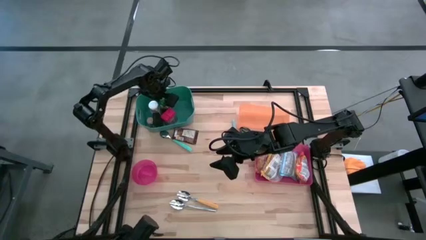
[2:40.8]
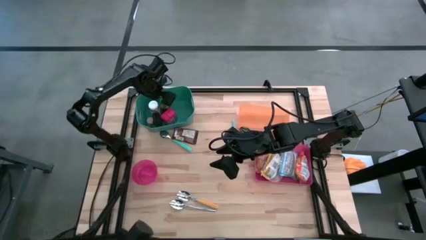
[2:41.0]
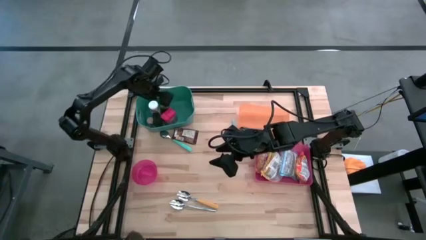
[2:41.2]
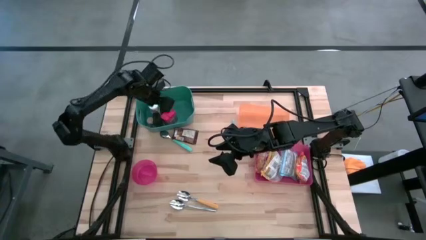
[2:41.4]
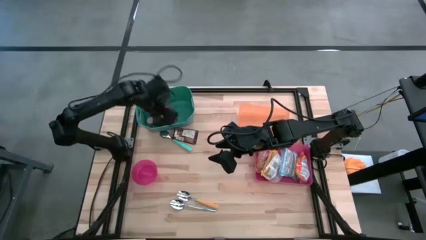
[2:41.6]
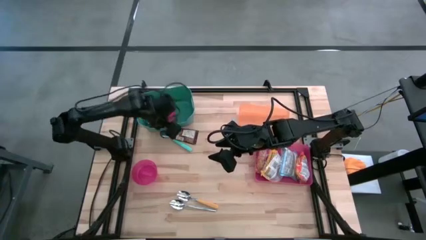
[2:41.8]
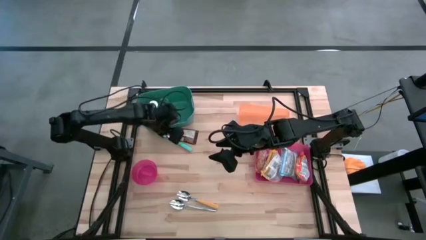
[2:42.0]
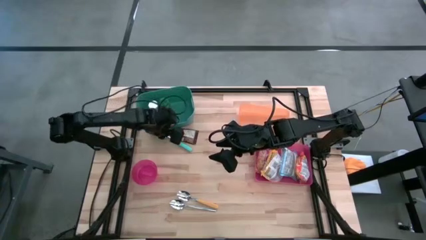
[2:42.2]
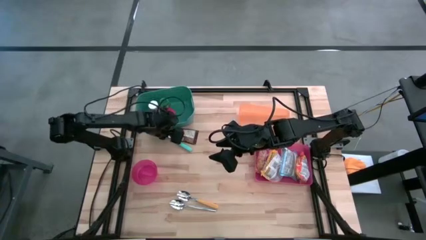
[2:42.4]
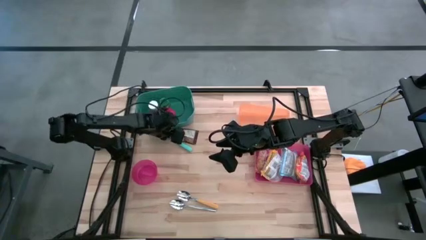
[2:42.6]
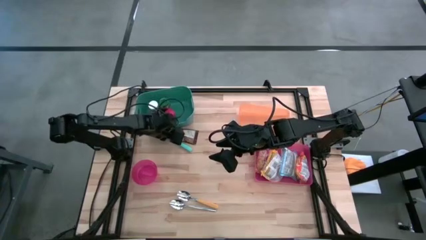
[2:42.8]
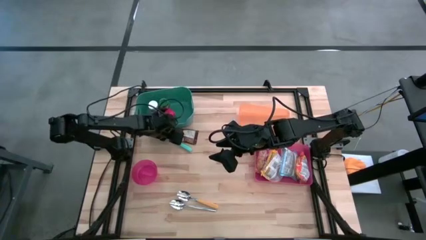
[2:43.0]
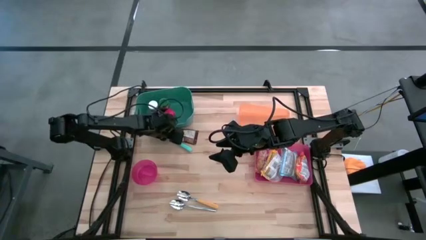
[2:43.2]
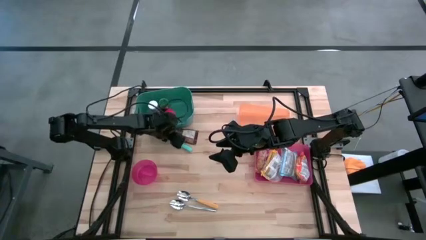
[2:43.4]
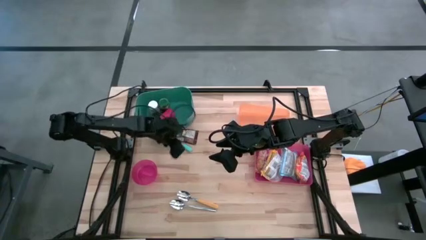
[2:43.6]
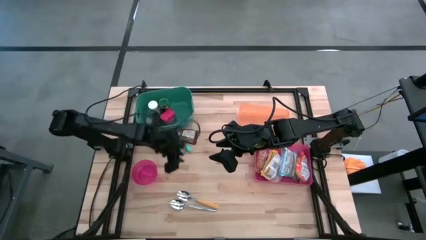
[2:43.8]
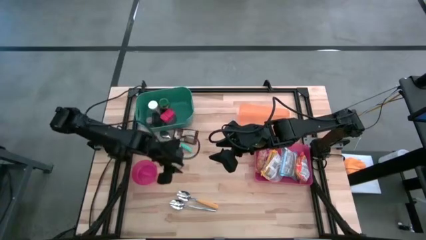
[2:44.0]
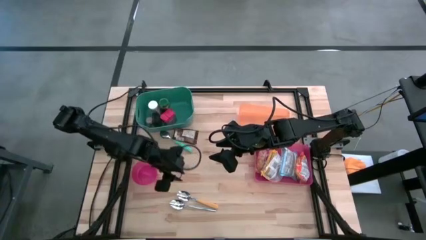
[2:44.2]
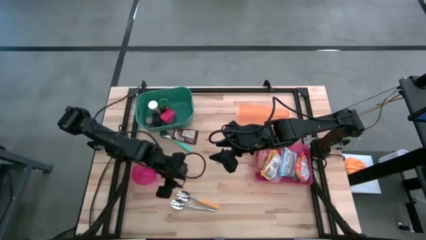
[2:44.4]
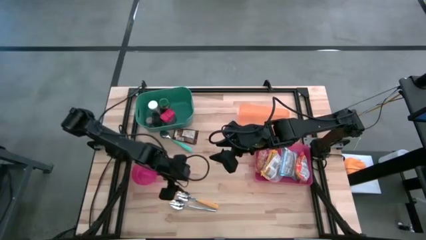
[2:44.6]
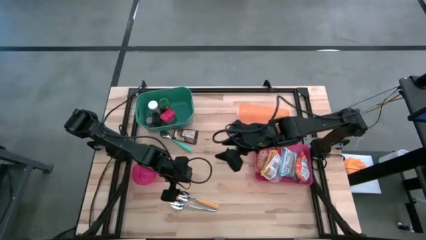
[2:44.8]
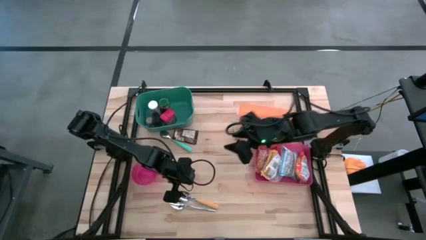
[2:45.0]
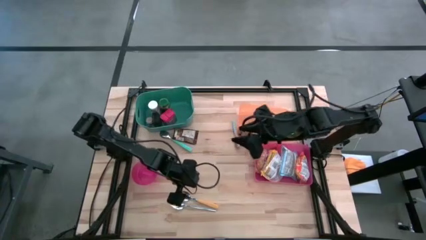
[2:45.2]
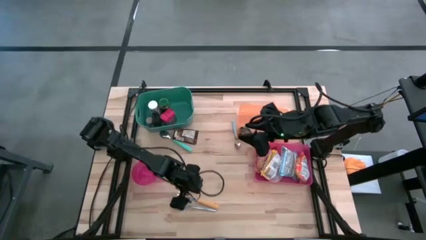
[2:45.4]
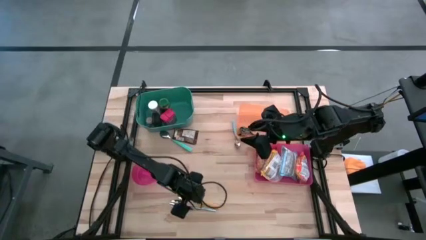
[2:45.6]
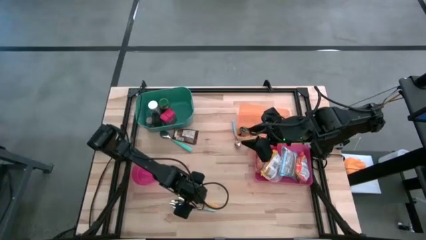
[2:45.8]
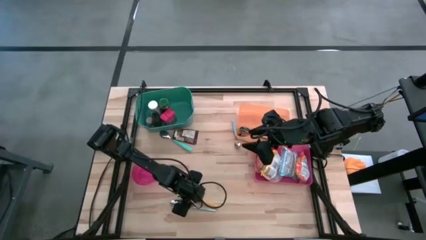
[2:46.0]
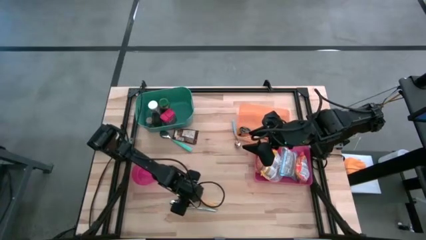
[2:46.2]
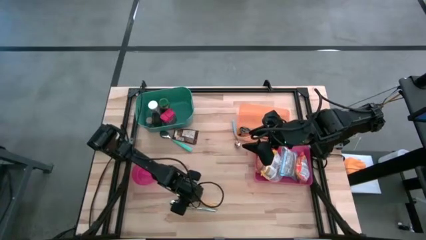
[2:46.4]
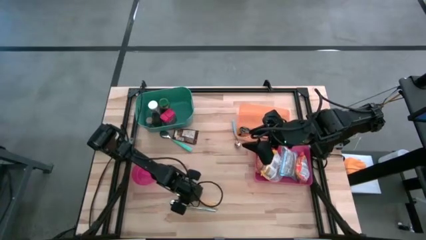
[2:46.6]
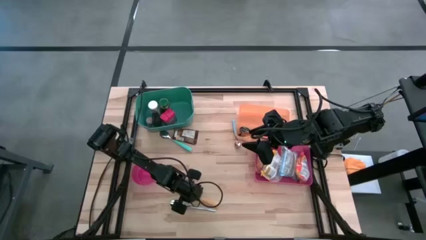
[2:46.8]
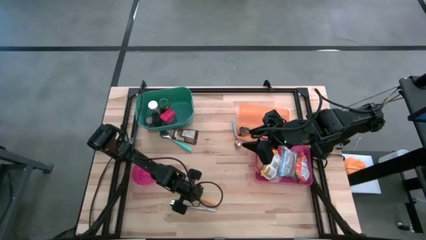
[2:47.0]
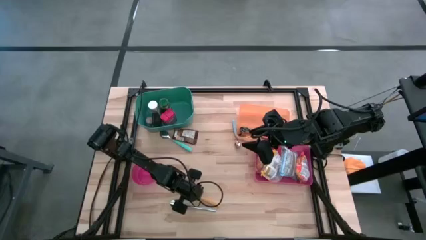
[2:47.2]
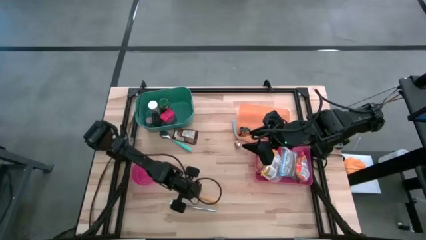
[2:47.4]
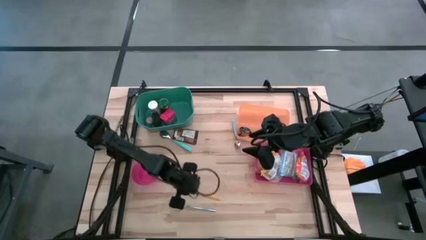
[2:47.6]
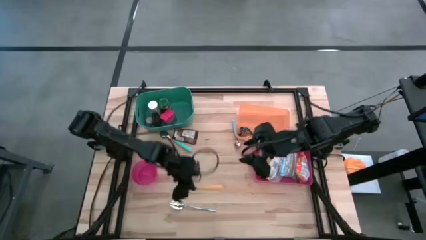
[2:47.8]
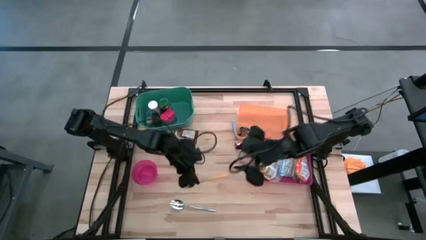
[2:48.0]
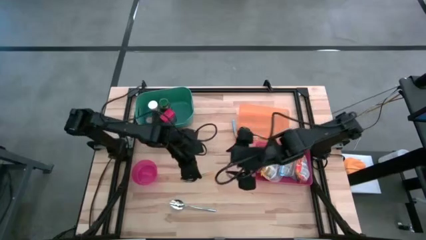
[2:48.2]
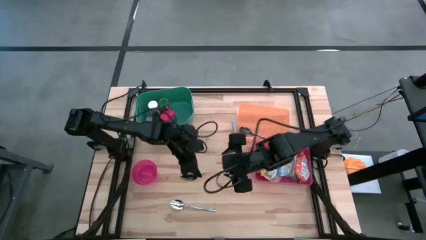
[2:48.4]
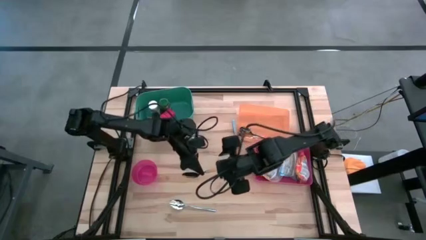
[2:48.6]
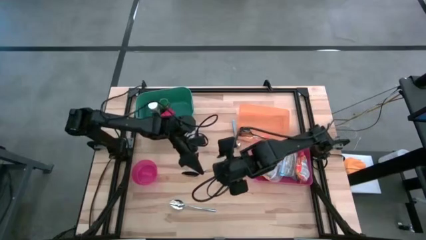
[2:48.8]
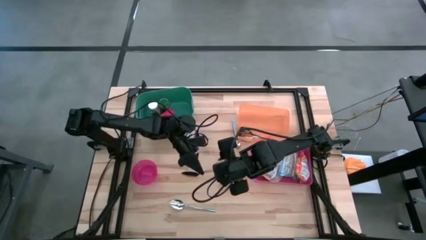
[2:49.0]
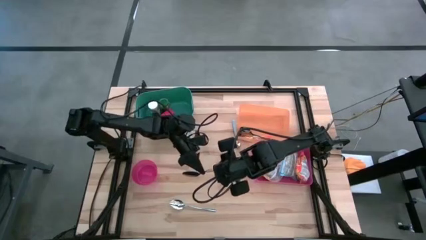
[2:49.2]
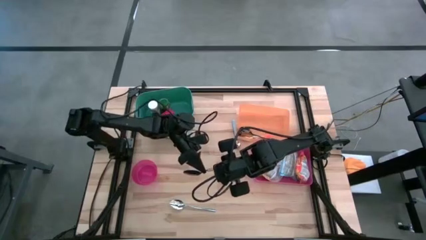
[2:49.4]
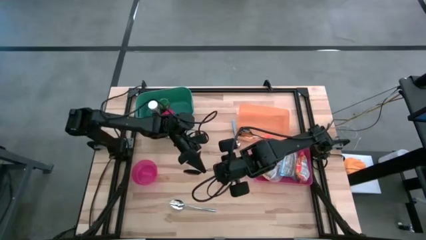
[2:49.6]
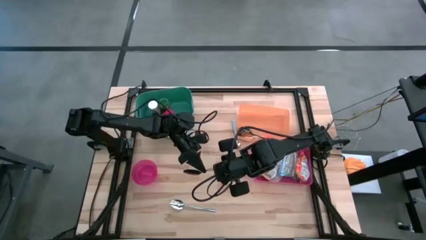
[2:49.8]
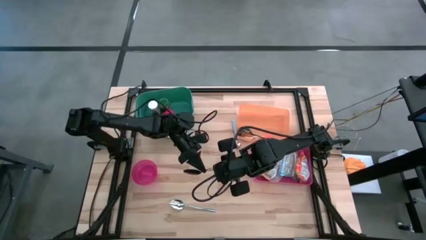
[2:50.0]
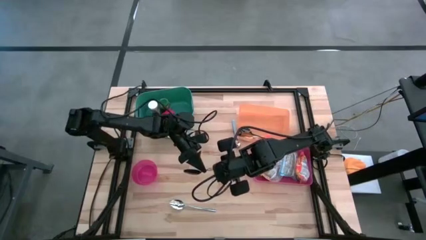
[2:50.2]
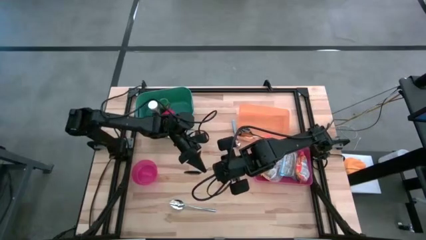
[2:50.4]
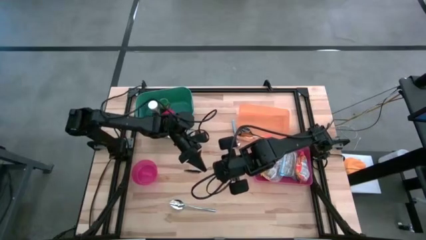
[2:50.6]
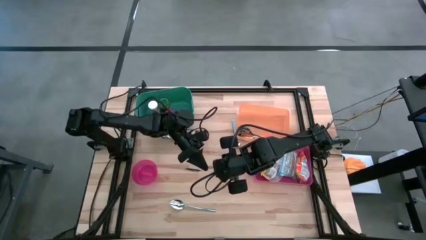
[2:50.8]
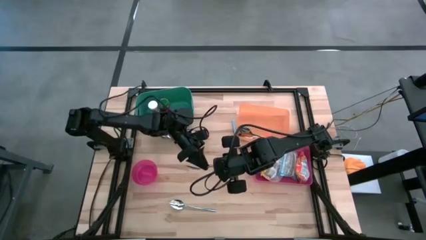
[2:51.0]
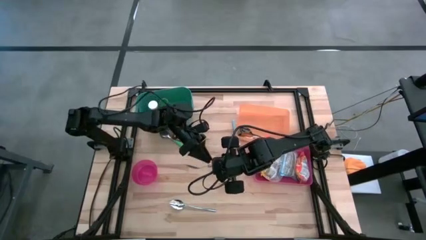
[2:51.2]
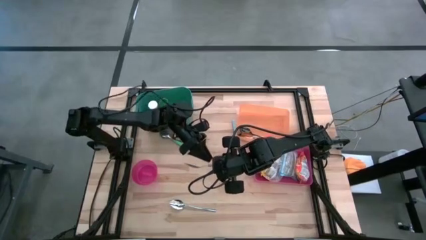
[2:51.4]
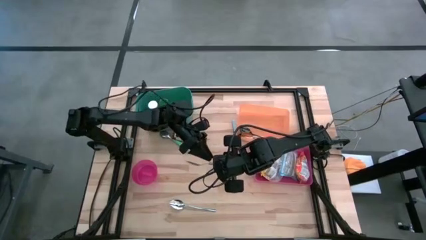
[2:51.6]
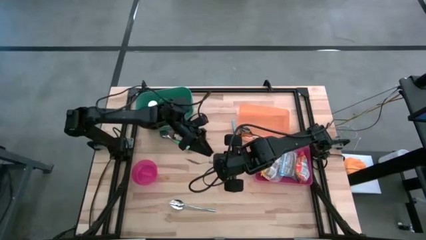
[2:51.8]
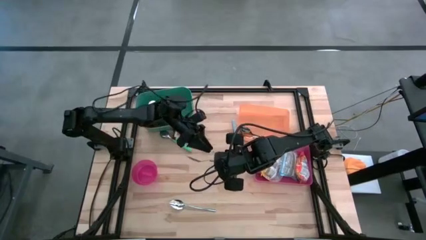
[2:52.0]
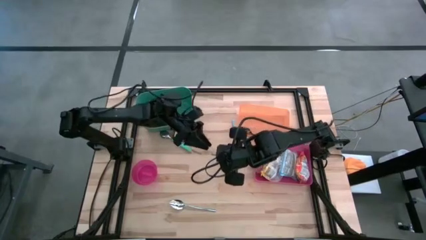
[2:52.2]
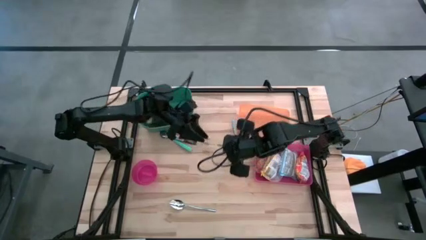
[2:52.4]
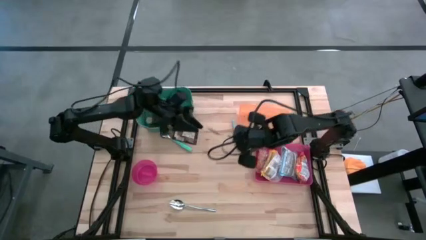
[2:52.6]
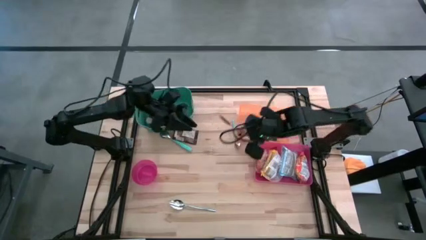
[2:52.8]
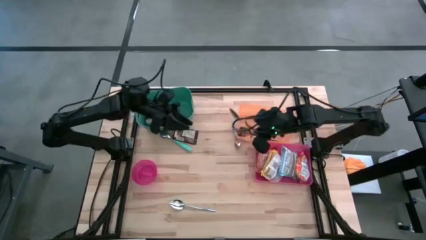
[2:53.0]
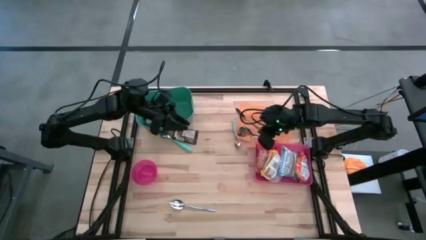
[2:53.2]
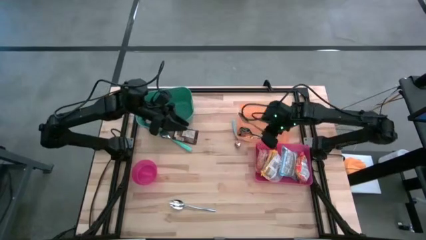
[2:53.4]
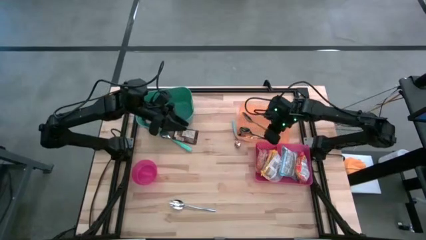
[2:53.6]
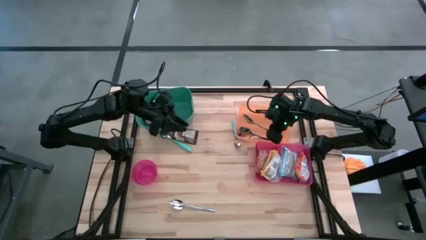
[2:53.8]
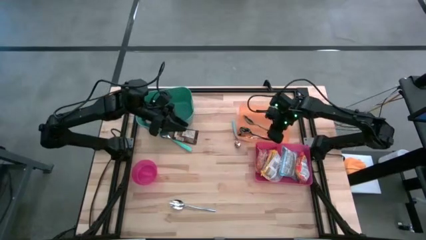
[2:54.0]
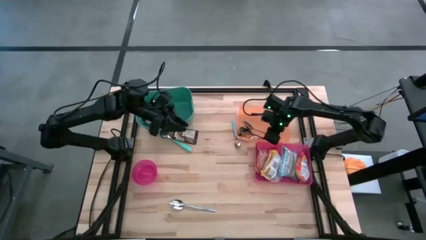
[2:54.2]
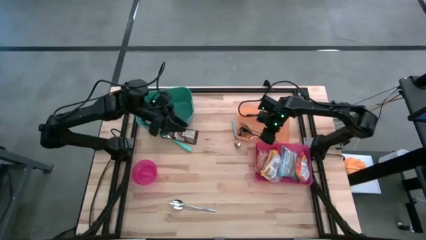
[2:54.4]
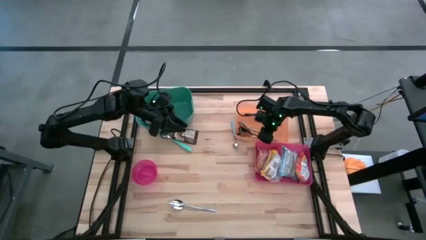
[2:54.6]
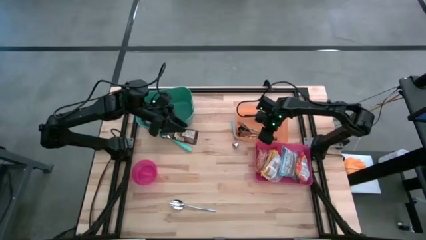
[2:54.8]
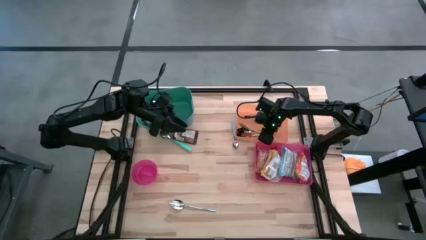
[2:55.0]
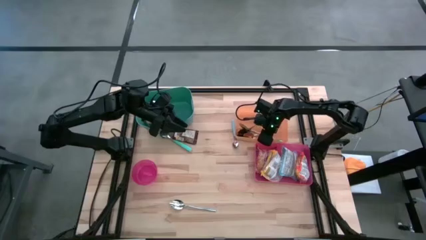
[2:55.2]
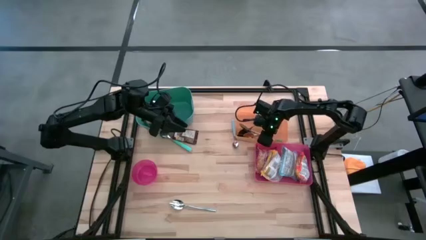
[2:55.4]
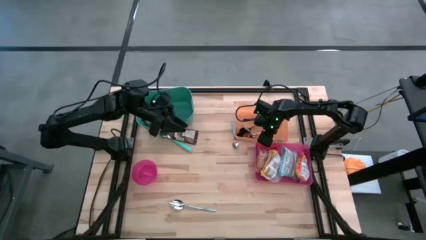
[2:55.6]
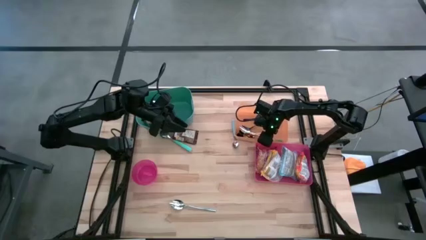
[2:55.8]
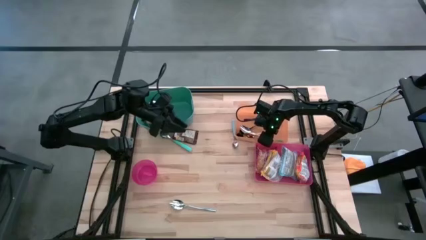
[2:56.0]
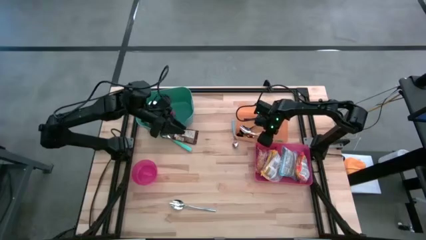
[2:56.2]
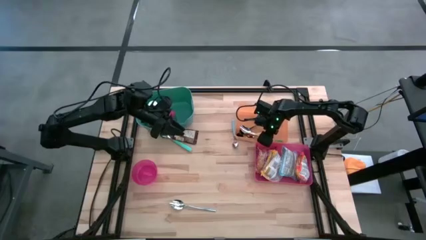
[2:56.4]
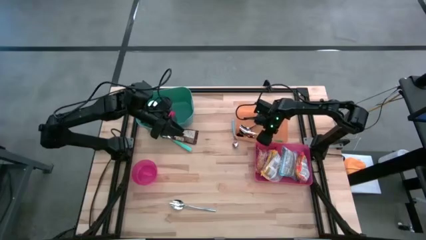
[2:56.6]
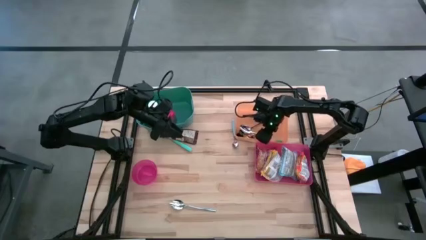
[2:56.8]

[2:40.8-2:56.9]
Put the orange spoon into the orange bin
